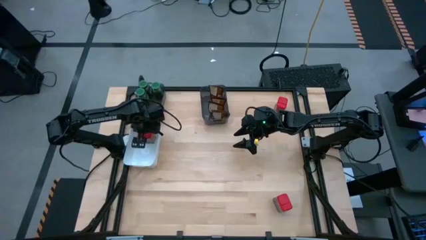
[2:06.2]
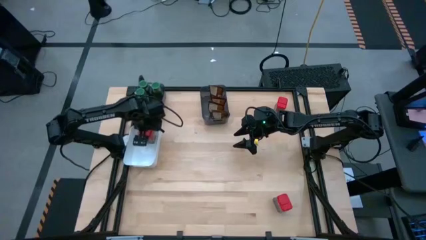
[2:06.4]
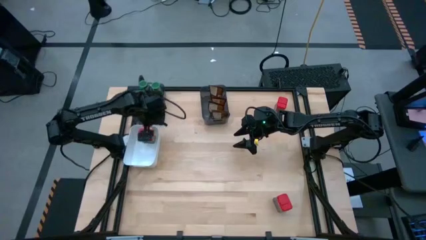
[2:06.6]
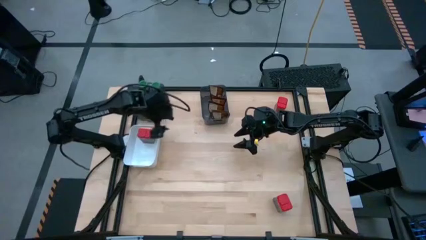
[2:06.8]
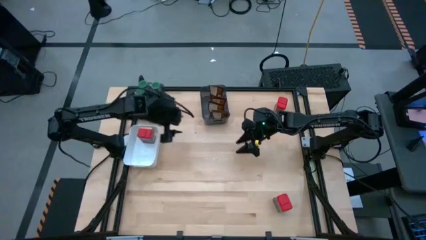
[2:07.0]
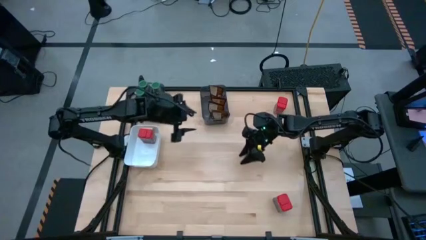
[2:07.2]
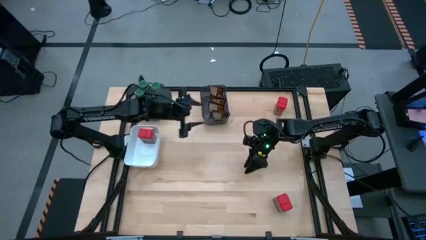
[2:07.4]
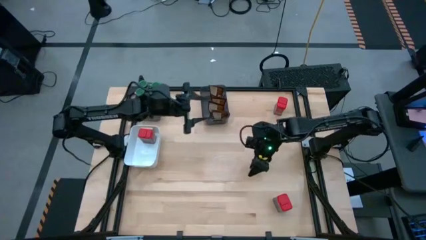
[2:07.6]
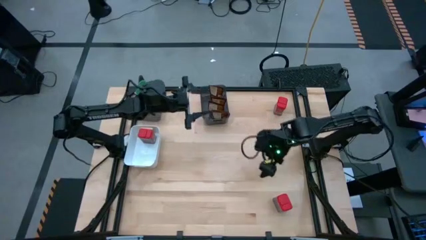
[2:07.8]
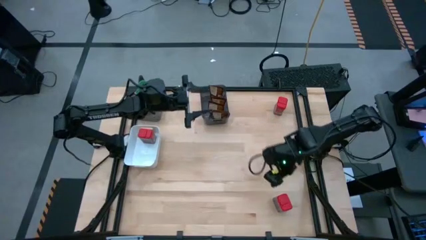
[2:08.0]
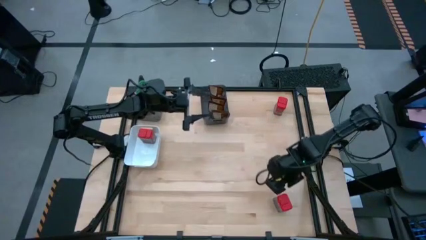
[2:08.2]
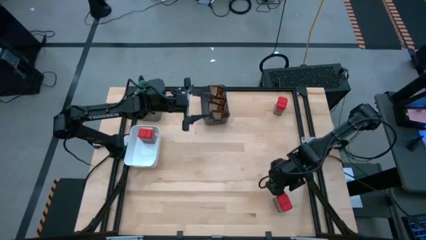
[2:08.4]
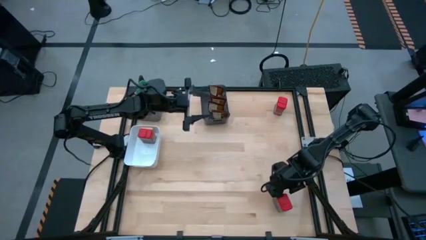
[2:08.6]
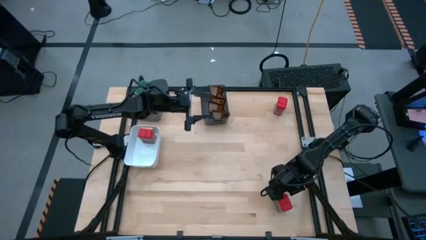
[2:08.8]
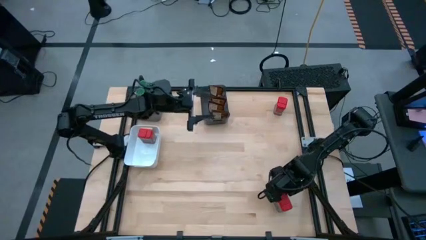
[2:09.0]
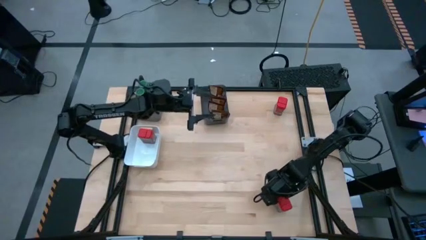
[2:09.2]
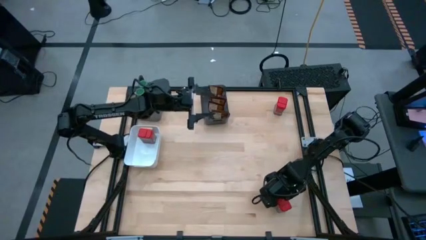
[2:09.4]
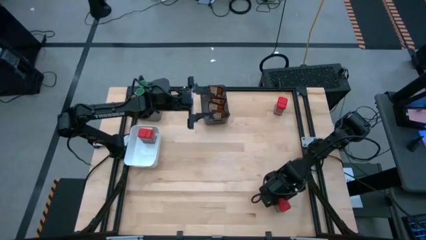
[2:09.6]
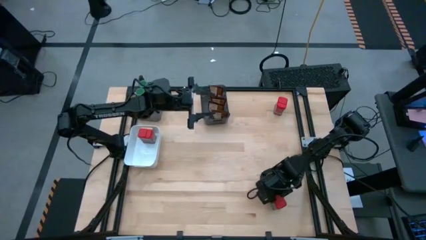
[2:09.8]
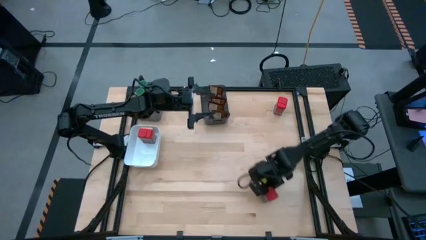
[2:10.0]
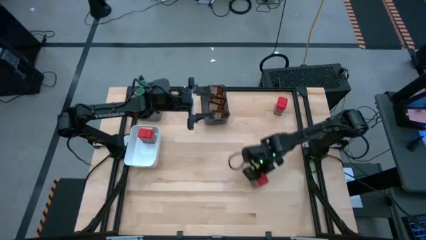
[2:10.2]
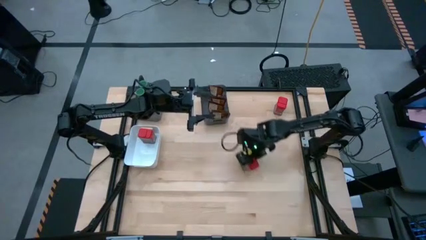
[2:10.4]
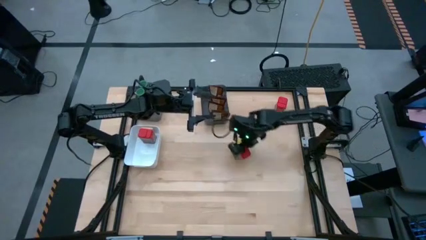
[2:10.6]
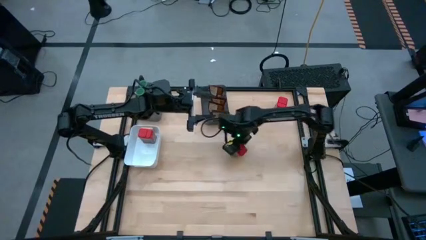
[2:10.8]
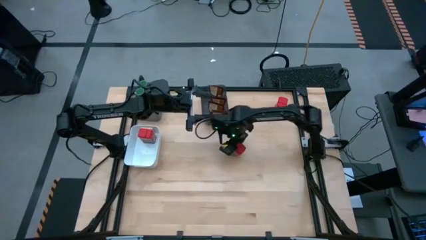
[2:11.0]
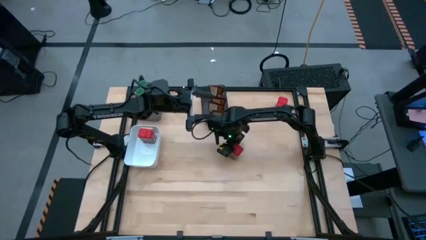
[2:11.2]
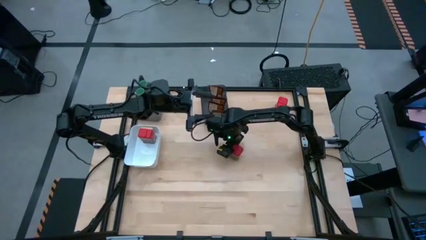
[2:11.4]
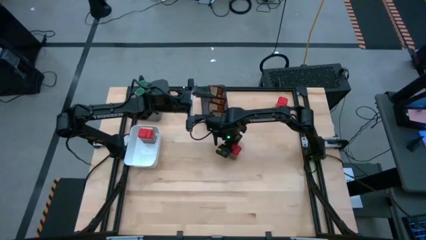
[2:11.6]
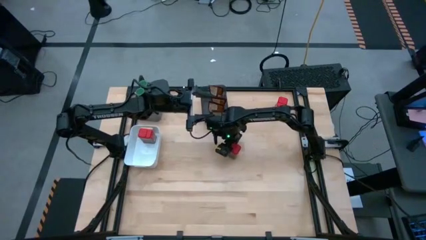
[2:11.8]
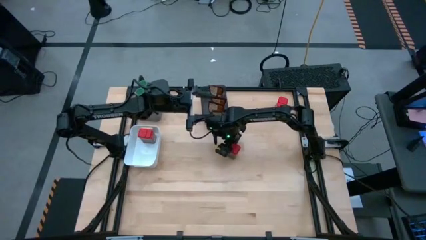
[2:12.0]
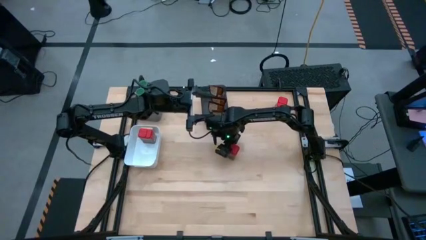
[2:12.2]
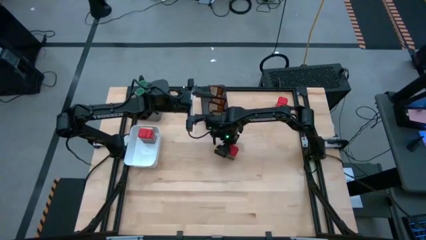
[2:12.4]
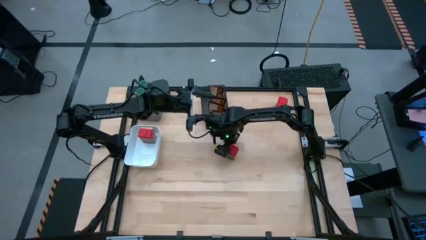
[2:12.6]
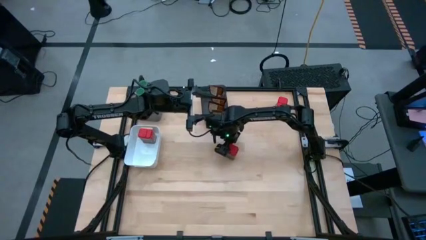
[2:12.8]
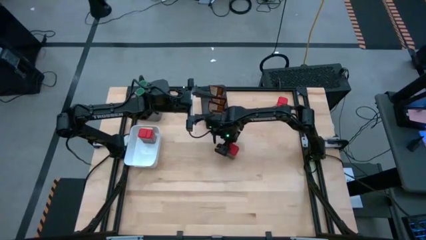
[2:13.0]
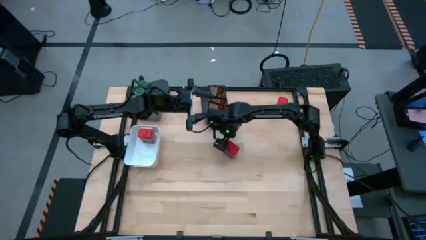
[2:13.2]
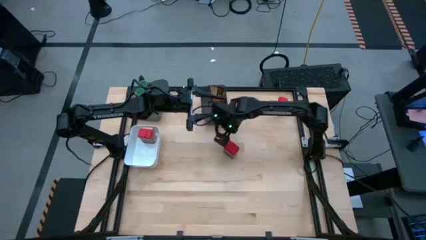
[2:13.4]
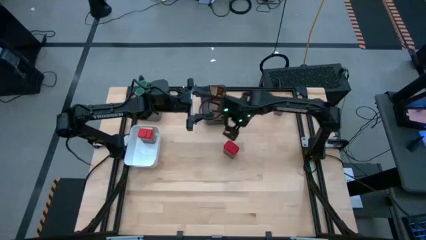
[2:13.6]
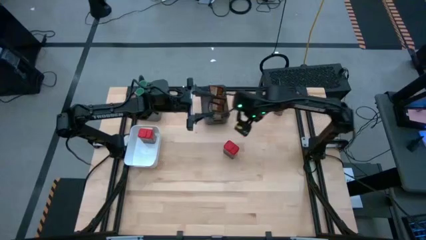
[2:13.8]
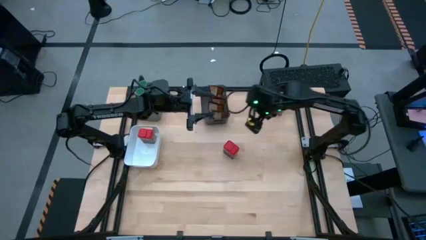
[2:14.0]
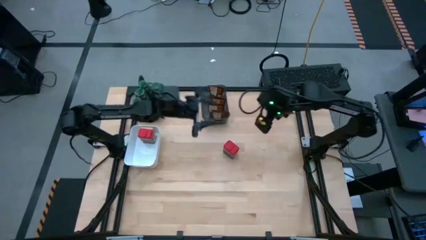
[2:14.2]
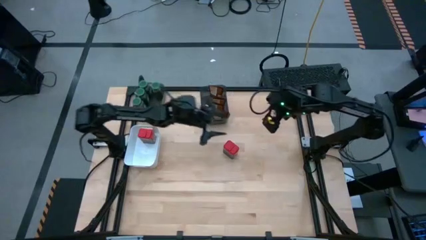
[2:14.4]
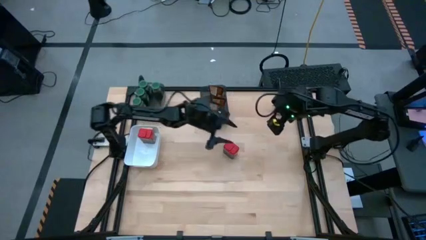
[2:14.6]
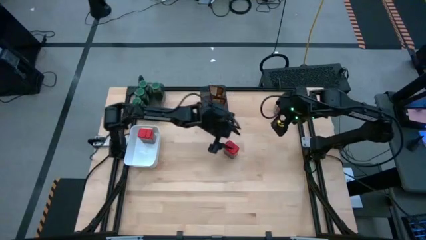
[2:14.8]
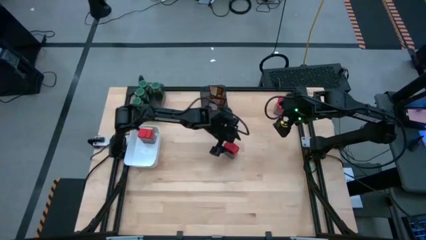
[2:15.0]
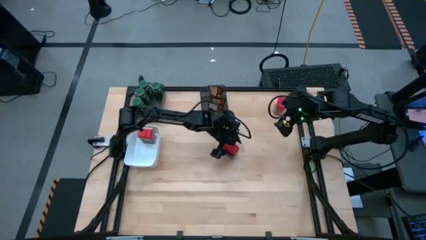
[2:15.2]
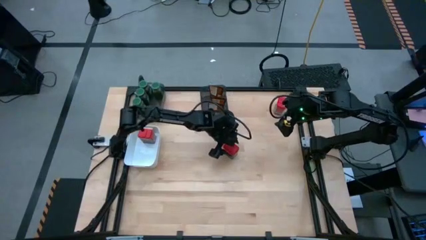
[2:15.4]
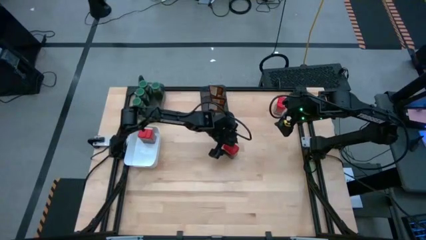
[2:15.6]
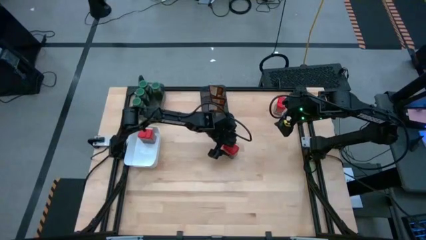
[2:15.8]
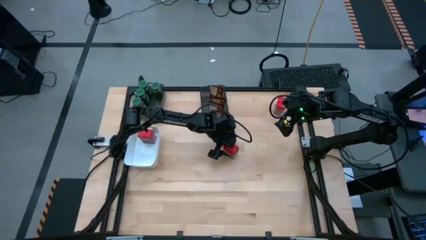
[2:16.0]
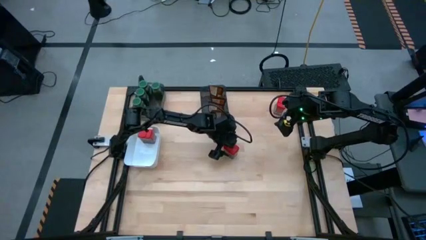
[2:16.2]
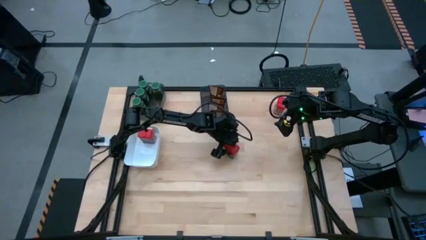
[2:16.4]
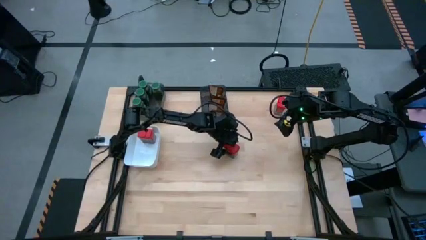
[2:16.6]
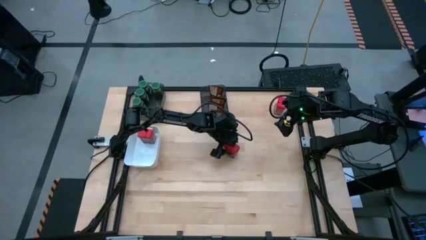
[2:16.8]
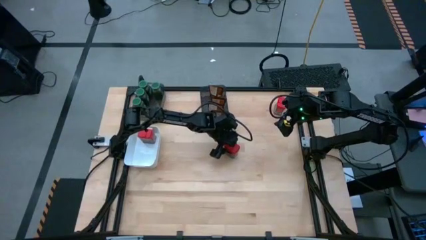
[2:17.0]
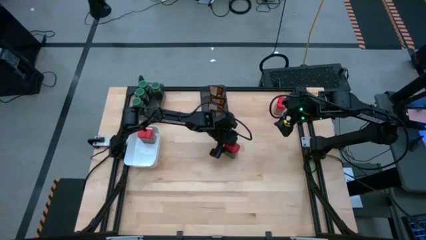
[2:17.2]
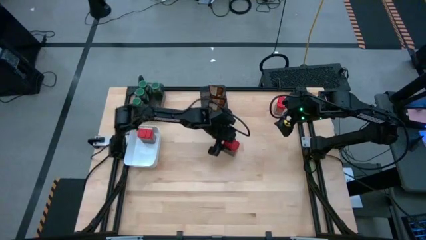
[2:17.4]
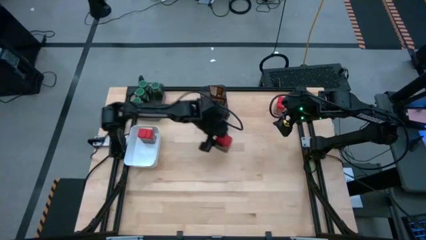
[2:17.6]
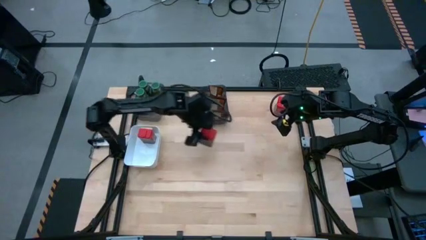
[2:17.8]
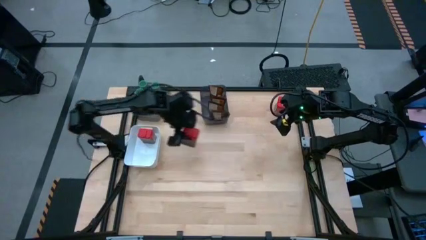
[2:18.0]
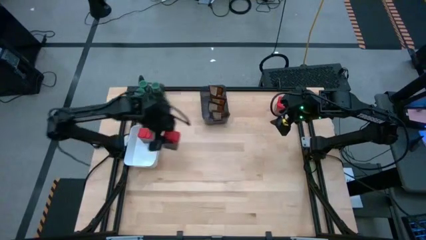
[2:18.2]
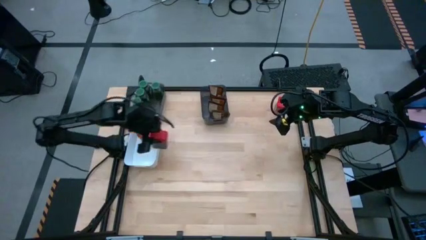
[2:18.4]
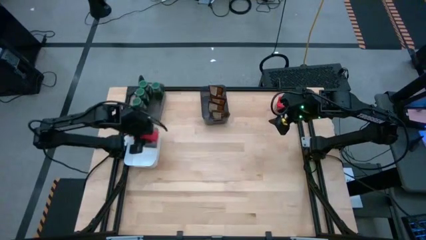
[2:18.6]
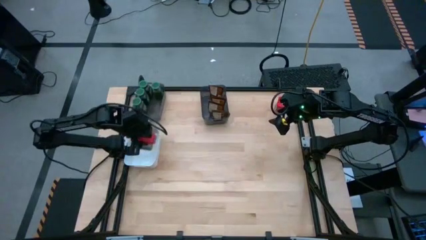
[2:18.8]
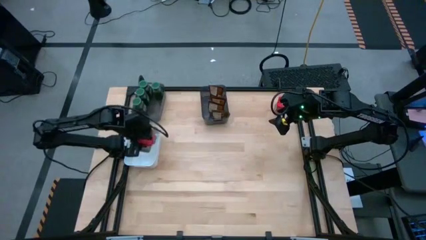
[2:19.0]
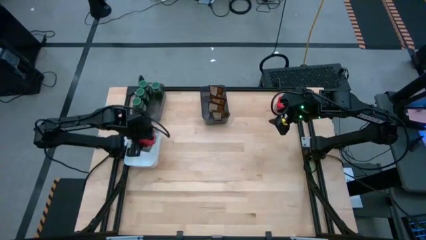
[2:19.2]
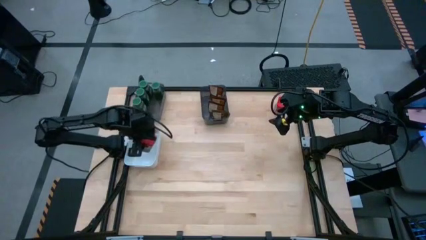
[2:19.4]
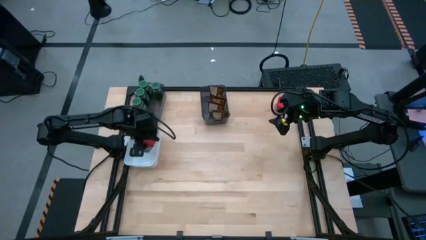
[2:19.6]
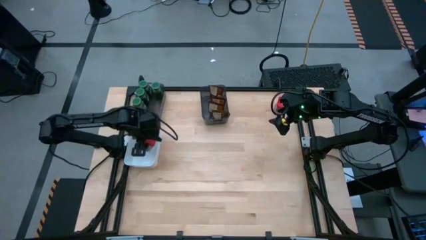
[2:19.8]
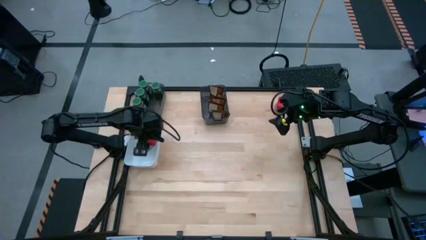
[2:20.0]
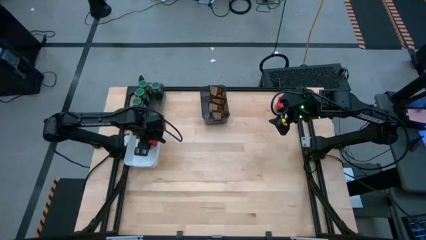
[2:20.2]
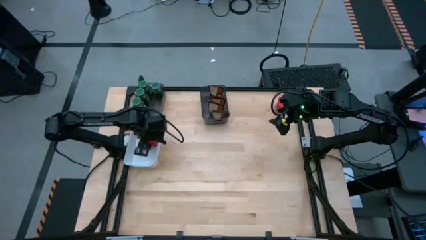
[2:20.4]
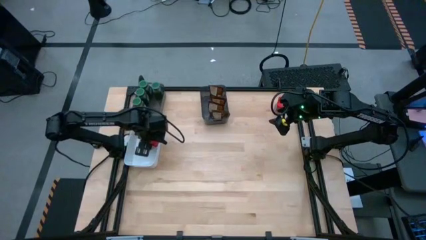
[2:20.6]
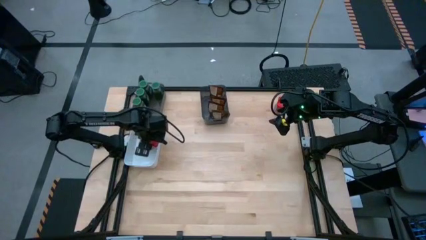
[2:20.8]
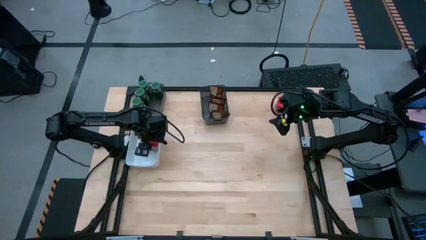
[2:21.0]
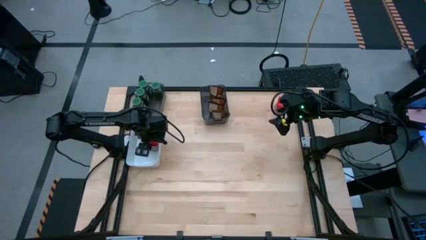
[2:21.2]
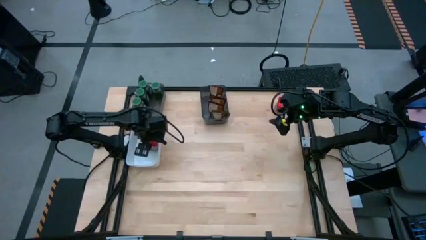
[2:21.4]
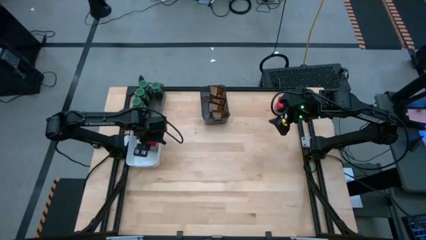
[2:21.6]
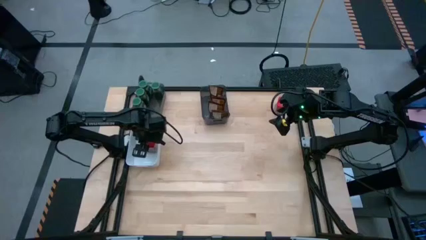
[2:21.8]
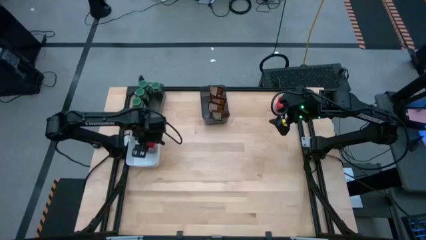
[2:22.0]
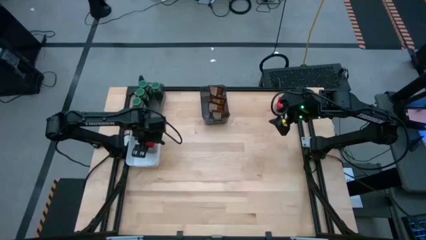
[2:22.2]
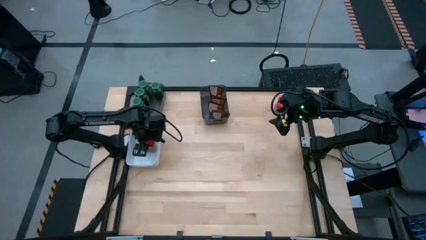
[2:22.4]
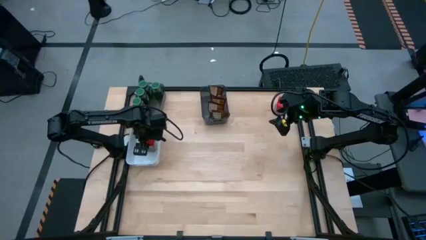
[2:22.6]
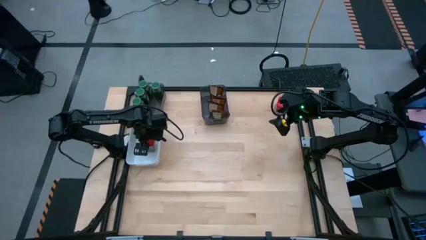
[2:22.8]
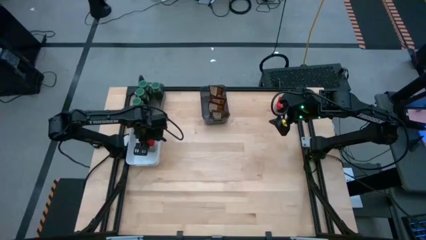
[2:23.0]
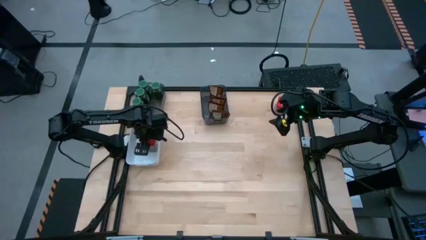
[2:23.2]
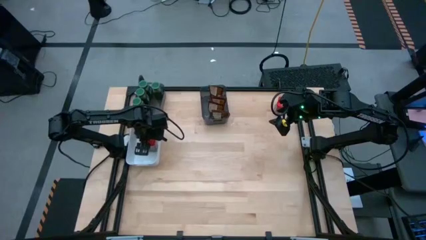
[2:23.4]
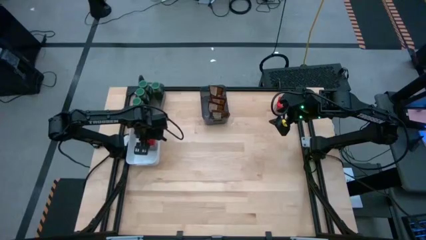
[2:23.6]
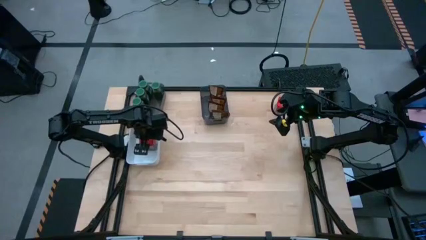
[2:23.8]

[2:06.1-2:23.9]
Task: Sort spices by type
Put the bottom red seasoning can into the white bin
